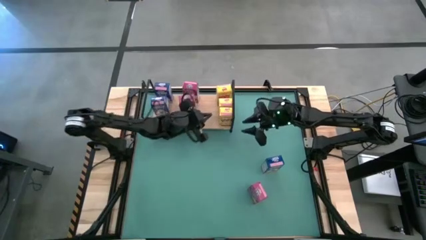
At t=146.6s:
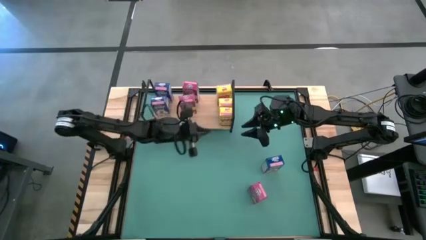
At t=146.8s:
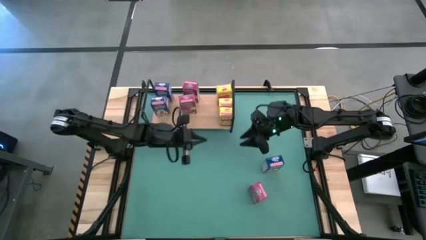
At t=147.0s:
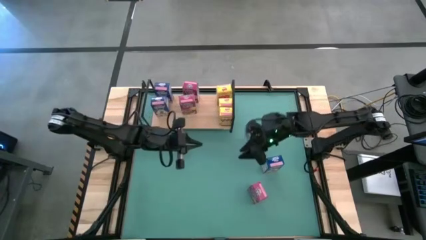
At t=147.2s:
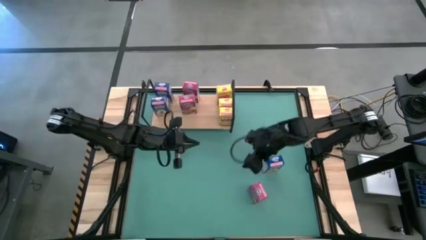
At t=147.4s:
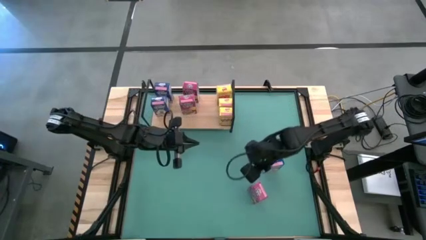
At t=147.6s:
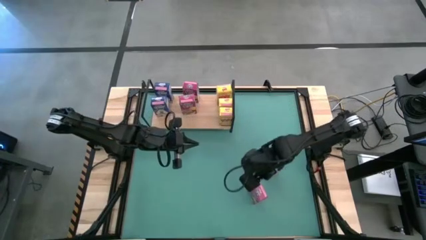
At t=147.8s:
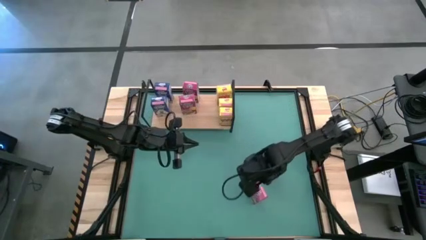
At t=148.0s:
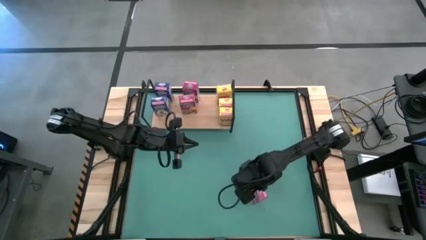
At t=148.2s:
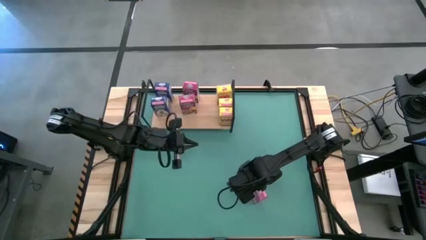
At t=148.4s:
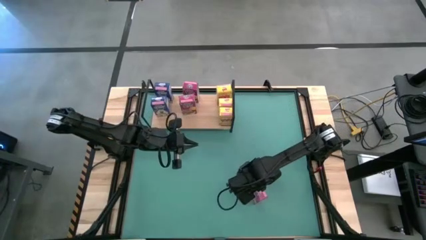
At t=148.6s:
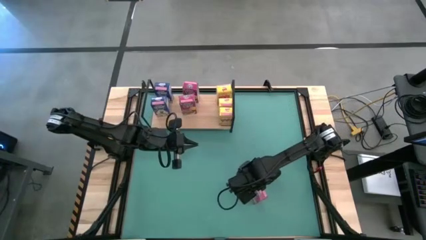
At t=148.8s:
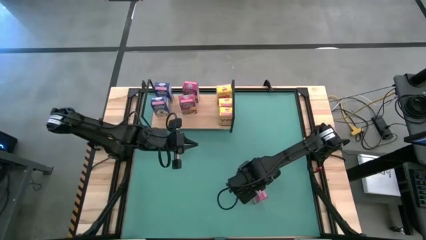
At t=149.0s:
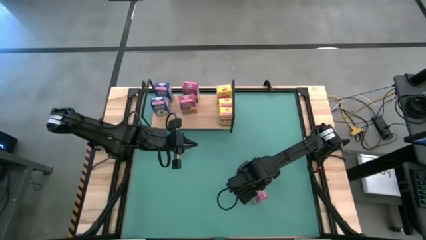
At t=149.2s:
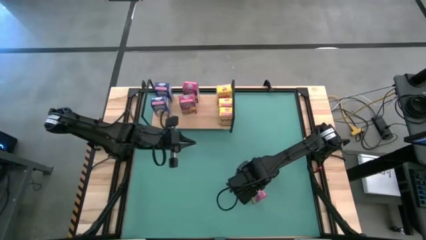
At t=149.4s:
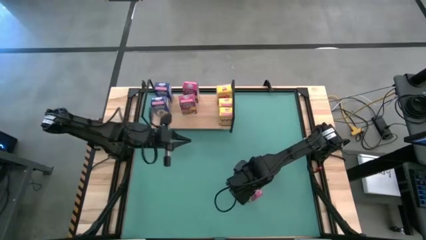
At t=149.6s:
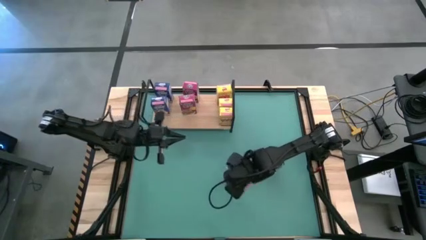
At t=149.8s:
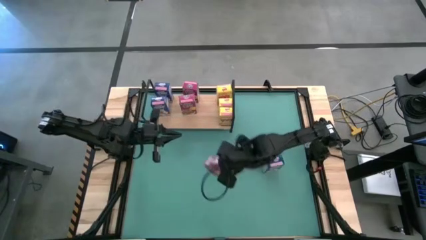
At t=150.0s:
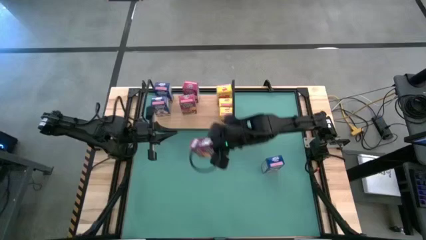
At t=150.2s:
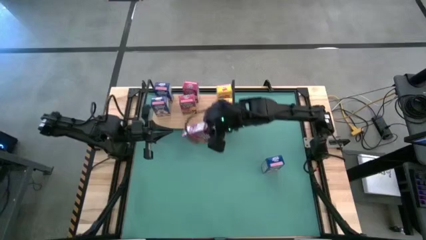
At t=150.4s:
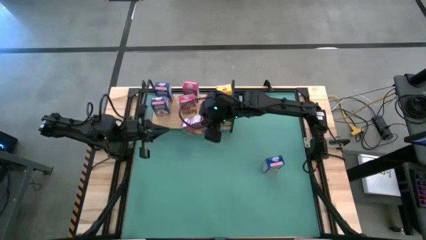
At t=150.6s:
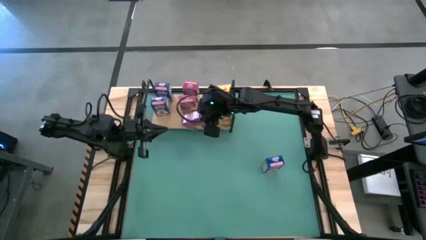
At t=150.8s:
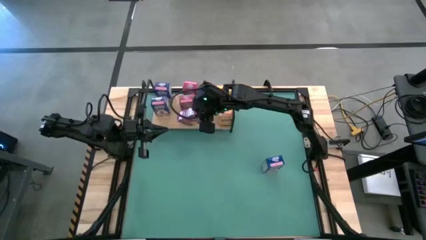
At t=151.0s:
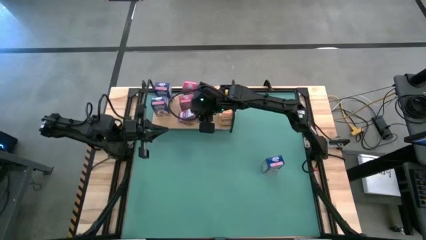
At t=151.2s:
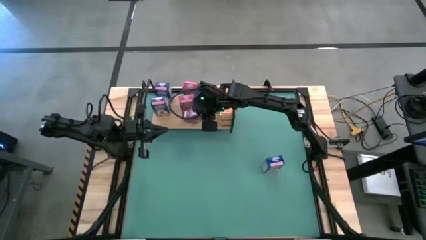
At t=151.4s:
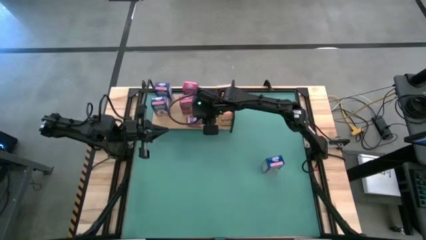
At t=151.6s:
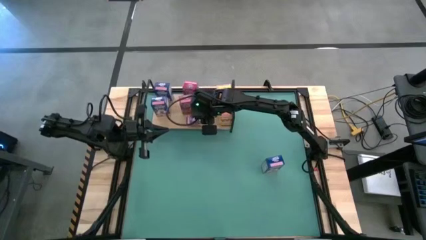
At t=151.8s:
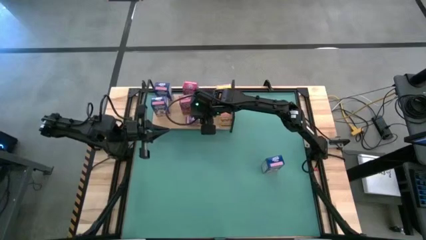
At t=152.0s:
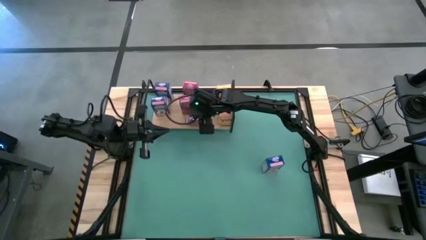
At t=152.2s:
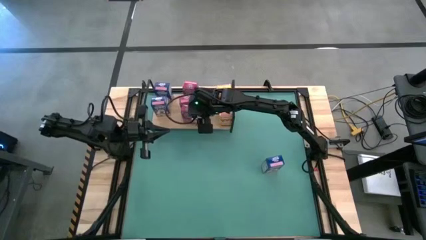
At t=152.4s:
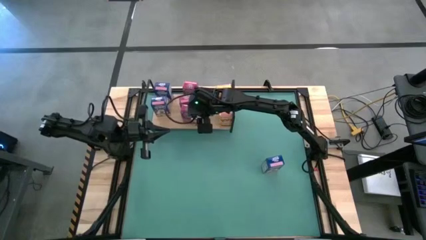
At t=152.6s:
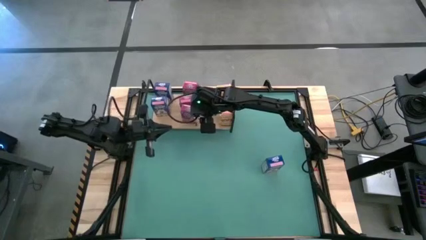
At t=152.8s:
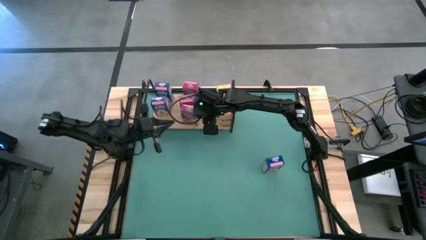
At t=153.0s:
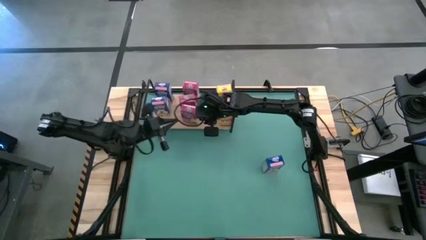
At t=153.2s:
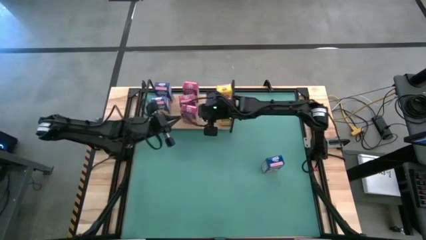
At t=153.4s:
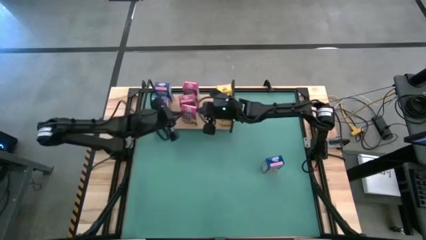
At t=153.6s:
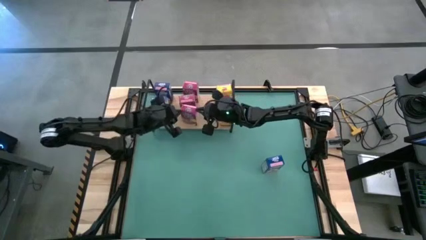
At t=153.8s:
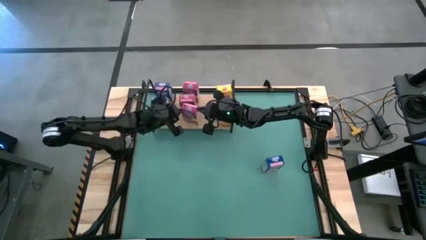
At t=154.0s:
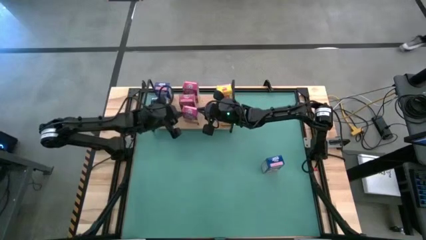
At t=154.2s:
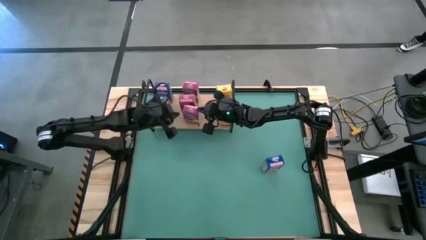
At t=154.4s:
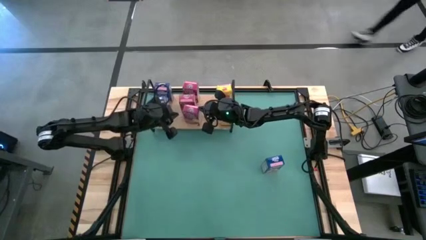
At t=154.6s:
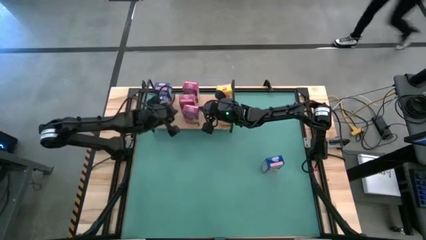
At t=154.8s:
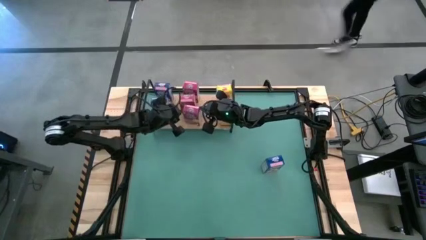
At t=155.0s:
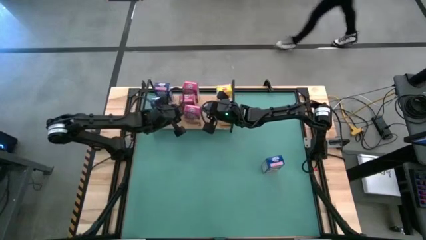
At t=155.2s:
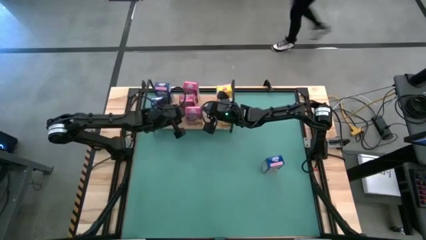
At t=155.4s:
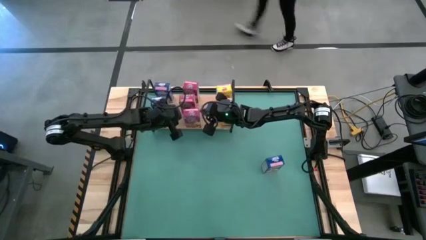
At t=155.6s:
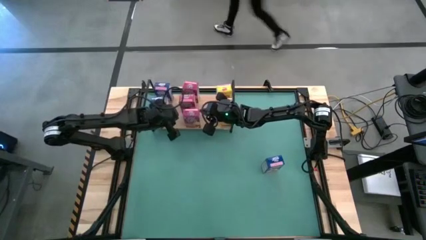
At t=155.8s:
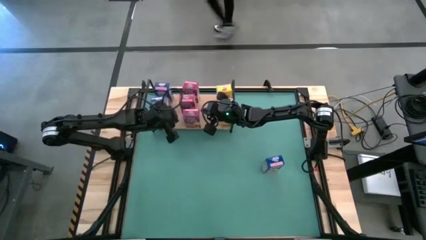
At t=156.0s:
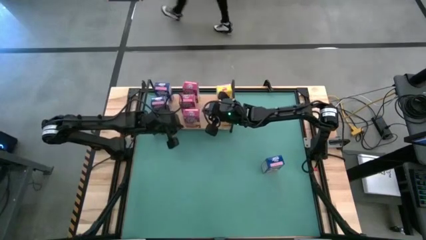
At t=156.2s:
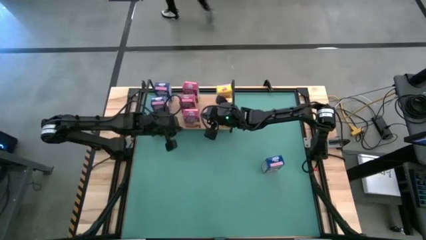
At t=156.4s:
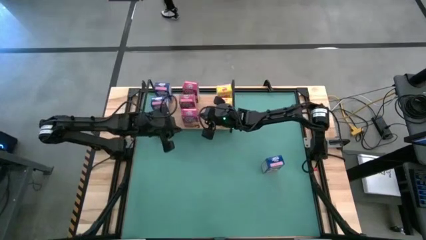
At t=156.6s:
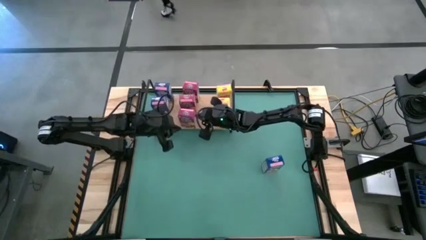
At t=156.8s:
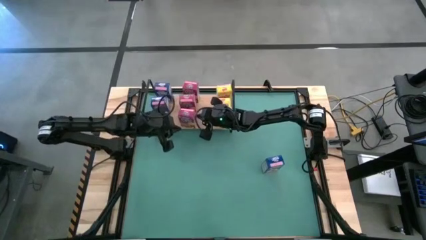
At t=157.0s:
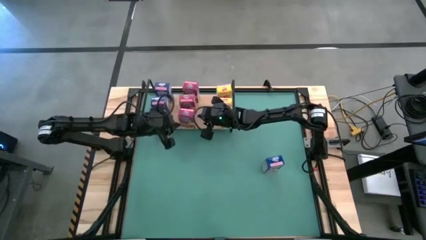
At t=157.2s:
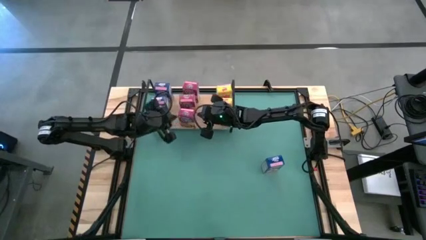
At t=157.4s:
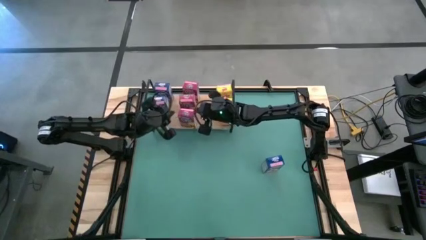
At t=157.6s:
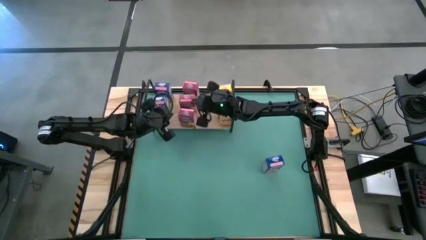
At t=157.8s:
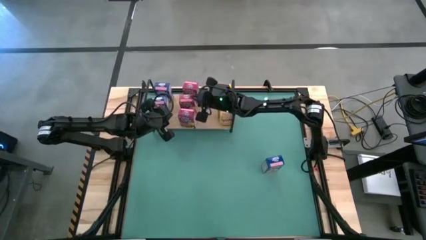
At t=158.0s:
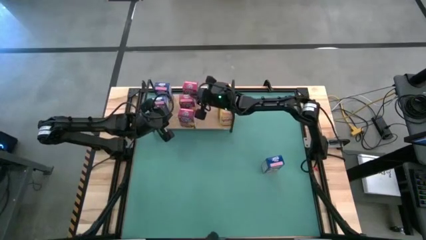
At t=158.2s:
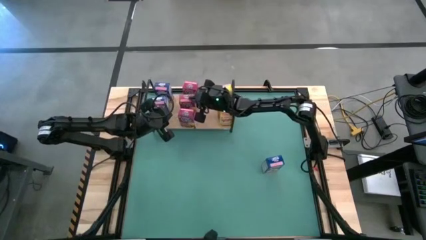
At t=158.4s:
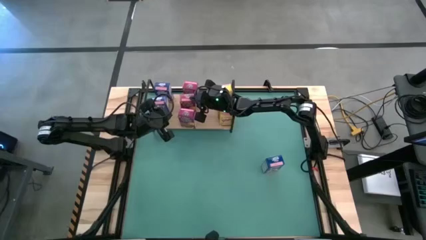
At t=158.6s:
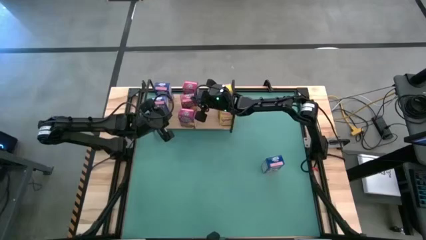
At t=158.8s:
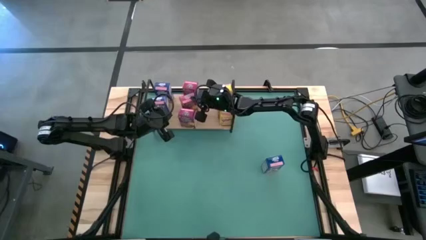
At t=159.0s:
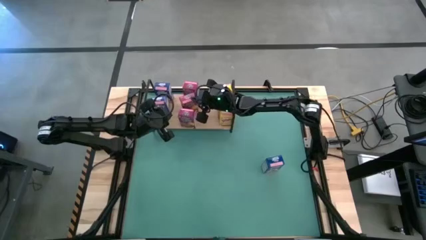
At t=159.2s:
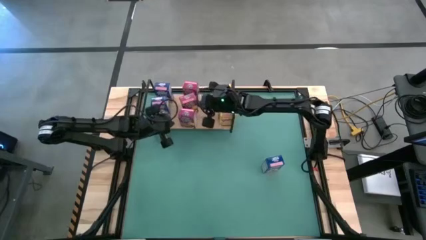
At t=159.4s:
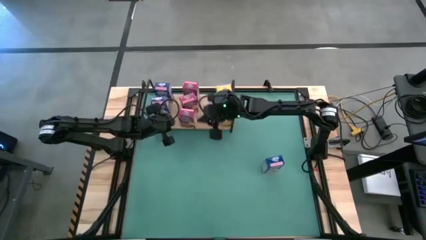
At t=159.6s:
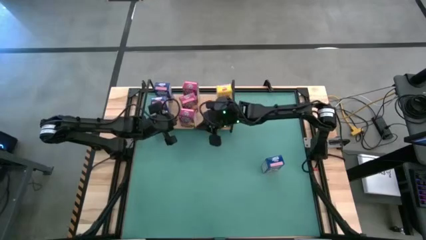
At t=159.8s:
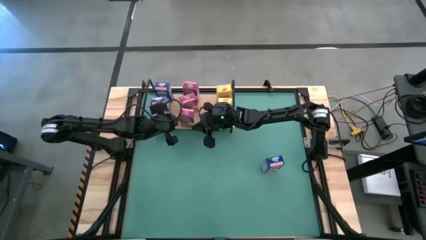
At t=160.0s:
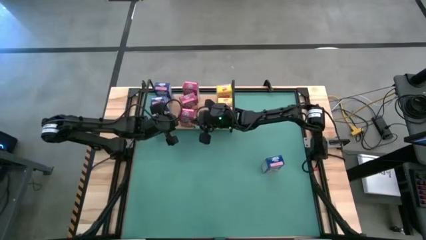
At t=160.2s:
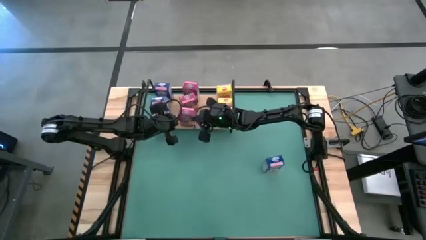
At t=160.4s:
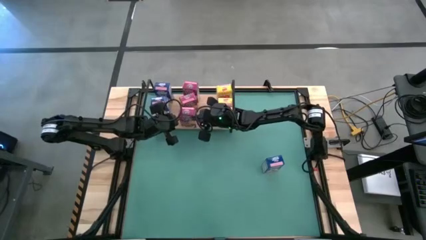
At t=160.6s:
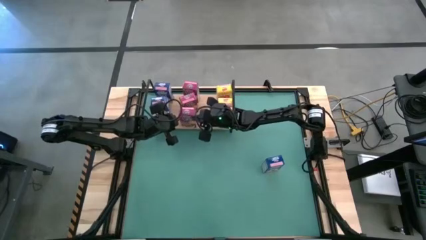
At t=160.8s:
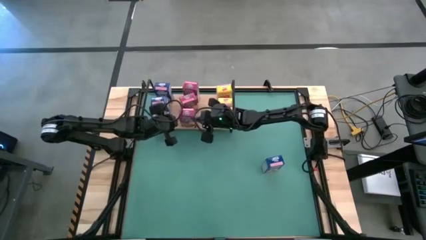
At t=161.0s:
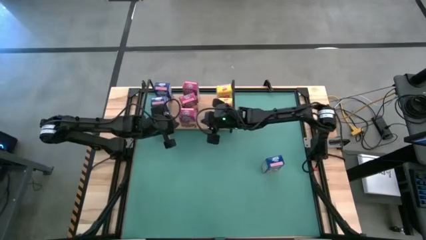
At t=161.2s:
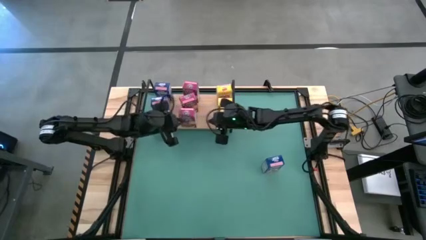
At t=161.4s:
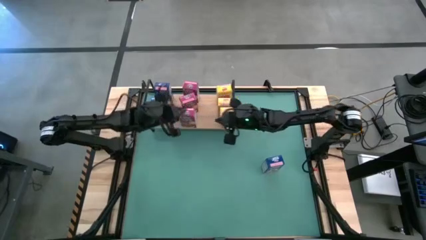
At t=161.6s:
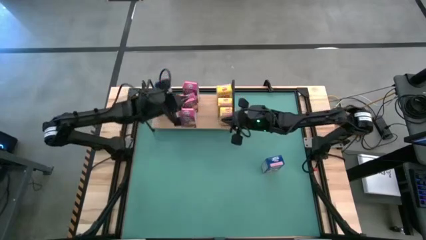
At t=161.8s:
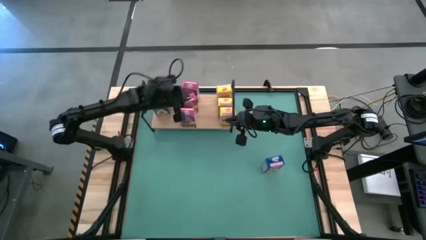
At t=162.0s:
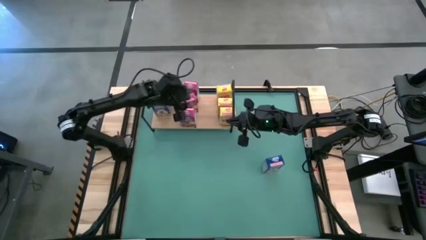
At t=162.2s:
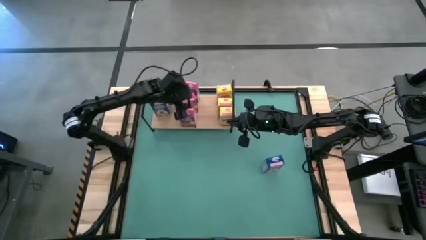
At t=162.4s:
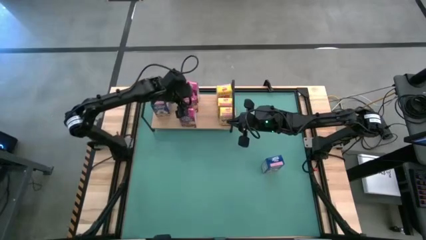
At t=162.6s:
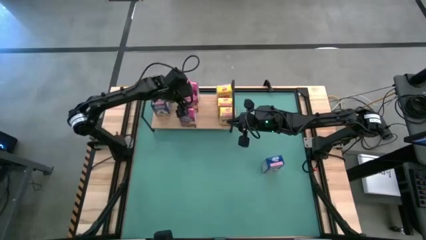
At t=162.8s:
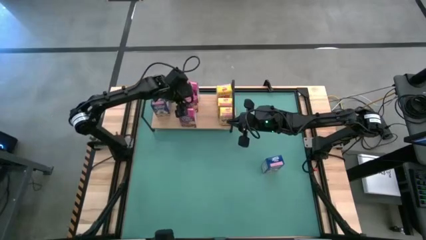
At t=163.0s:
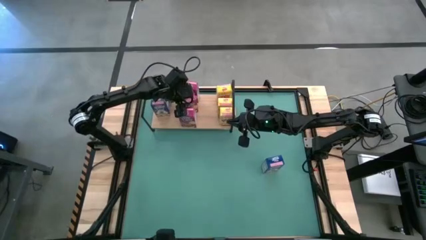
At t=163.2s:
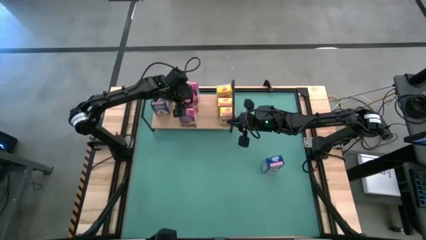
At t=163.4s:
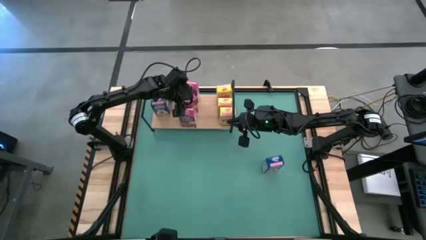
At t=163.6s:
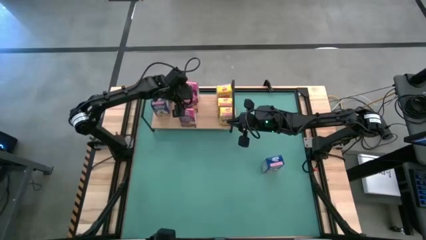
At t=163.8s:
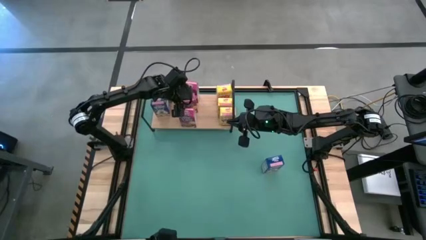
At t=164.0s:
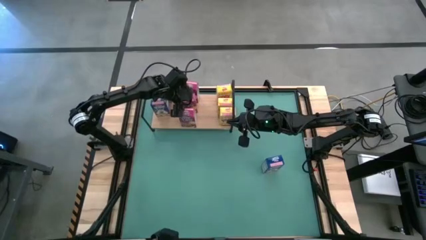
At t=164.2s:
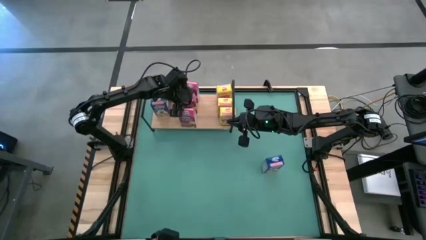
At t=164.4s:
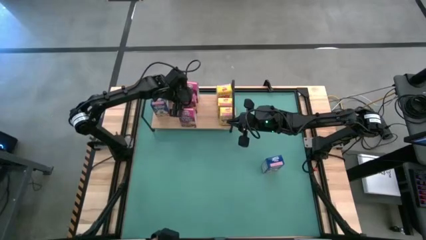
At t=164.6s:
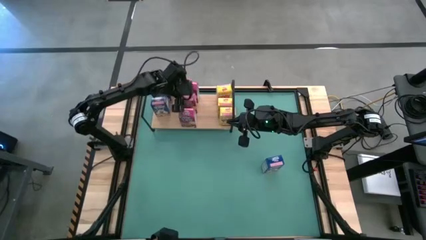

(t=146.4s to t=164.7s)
Task: Stack cereal on shelf
Put the pink cereal box on the shelf
